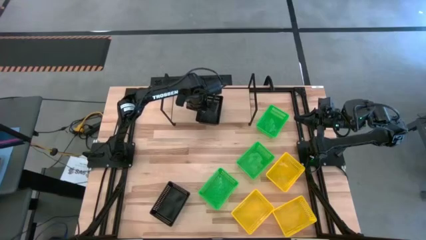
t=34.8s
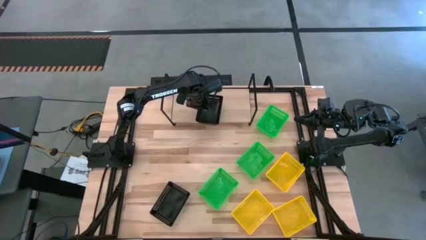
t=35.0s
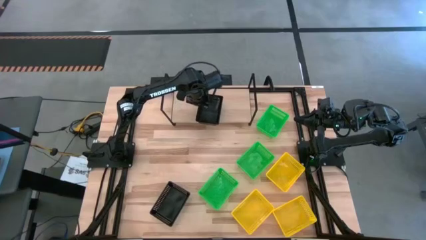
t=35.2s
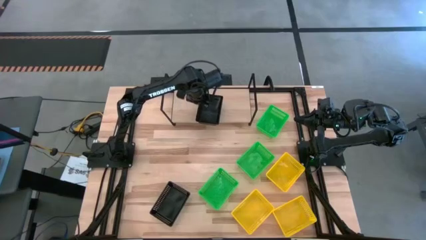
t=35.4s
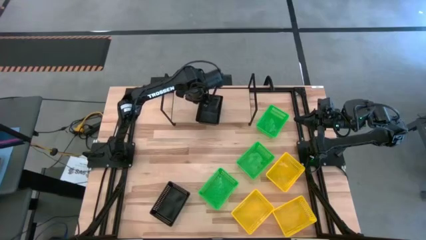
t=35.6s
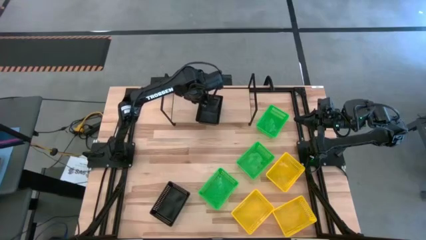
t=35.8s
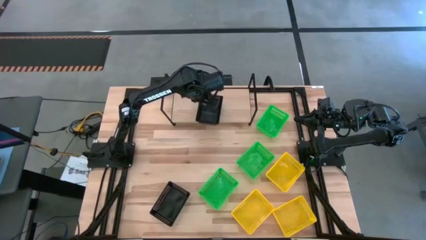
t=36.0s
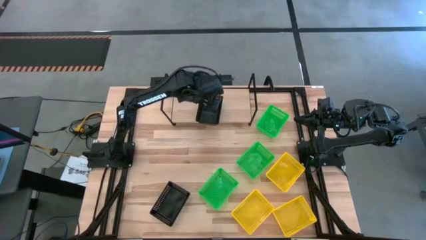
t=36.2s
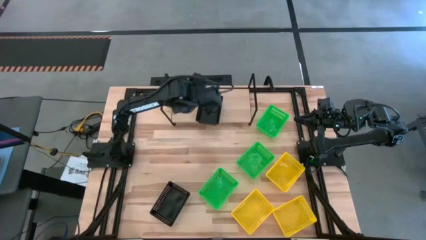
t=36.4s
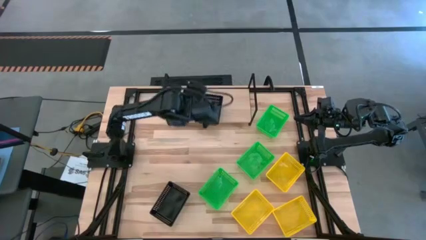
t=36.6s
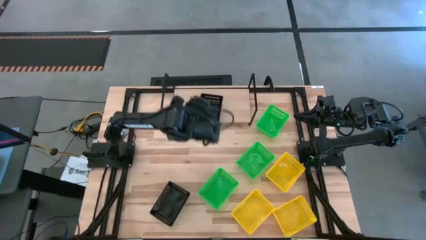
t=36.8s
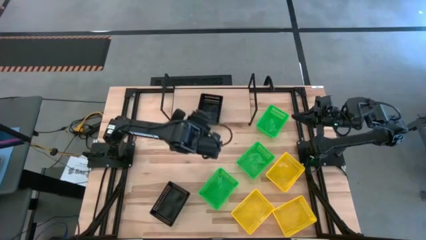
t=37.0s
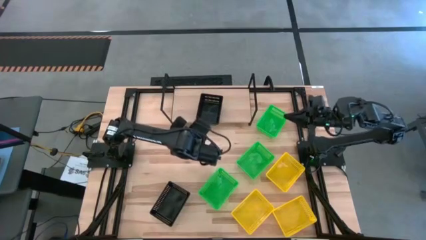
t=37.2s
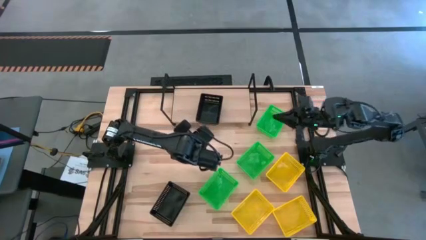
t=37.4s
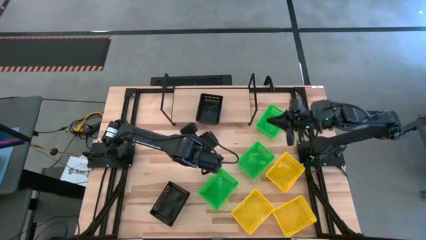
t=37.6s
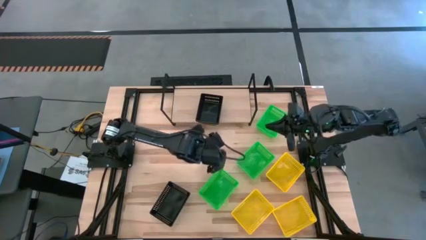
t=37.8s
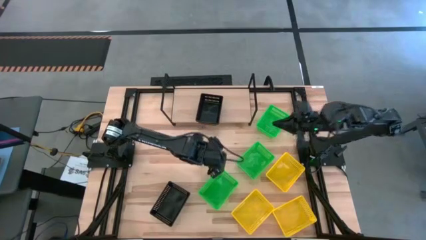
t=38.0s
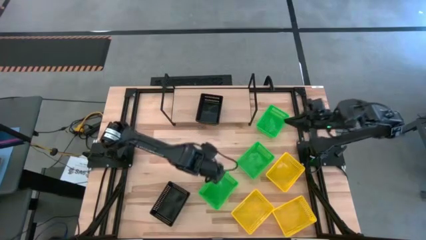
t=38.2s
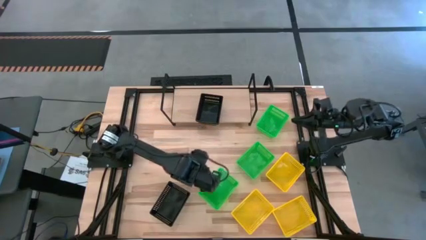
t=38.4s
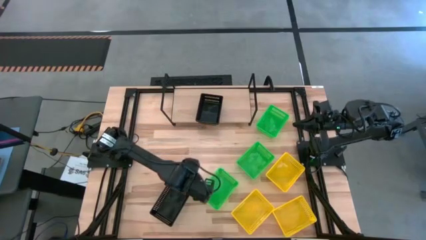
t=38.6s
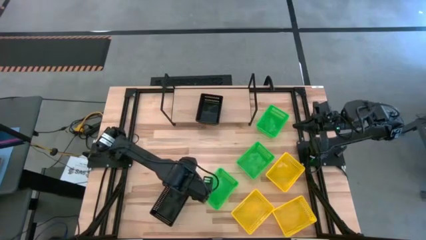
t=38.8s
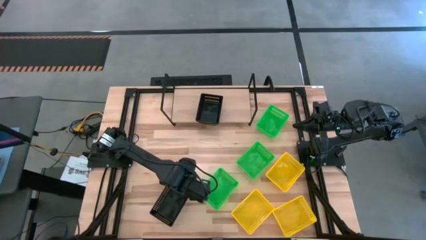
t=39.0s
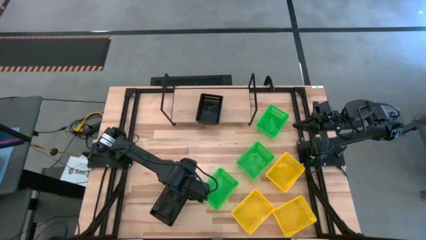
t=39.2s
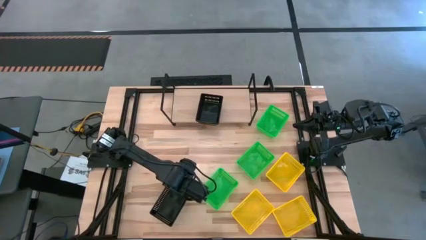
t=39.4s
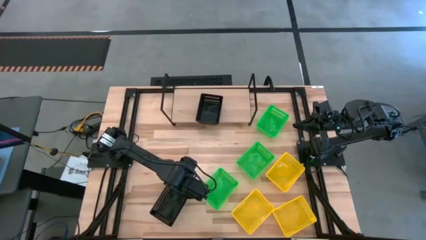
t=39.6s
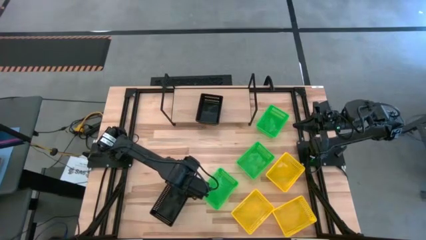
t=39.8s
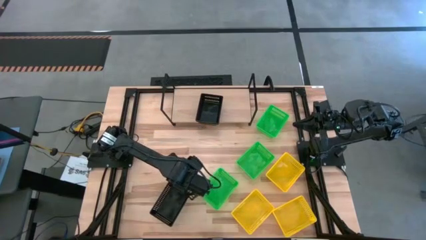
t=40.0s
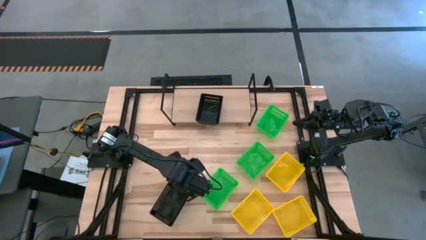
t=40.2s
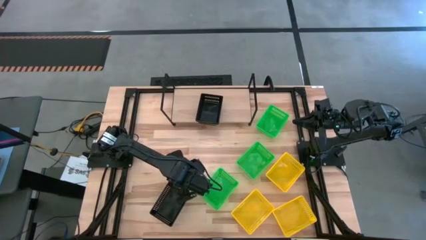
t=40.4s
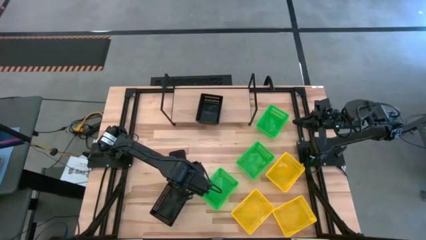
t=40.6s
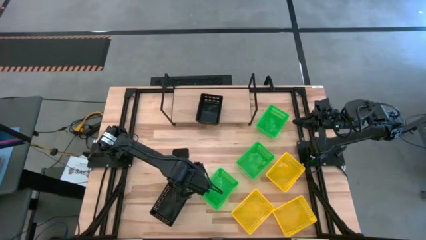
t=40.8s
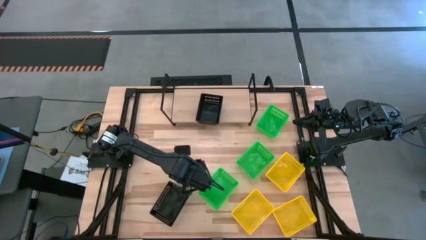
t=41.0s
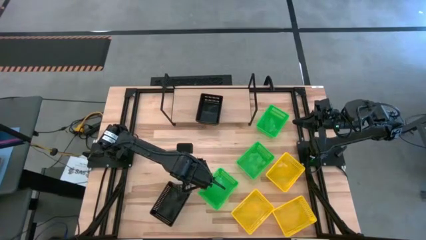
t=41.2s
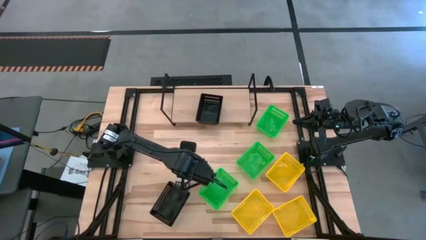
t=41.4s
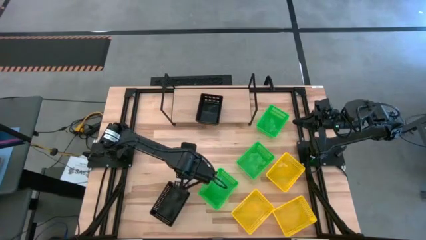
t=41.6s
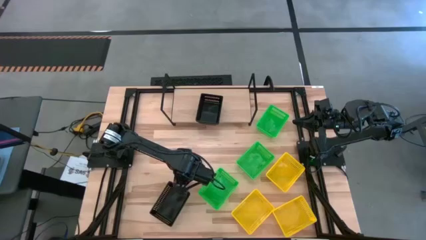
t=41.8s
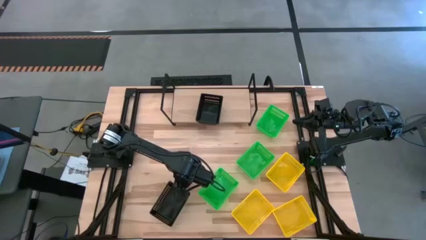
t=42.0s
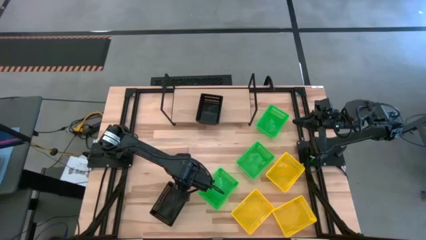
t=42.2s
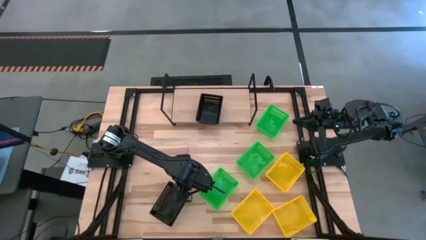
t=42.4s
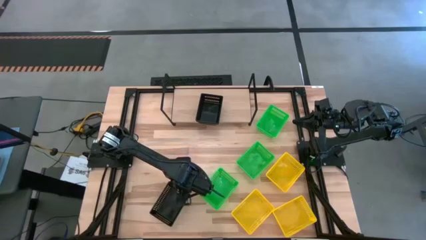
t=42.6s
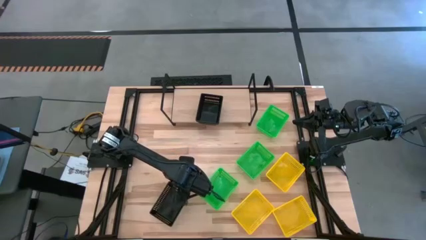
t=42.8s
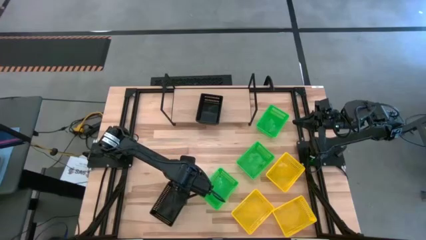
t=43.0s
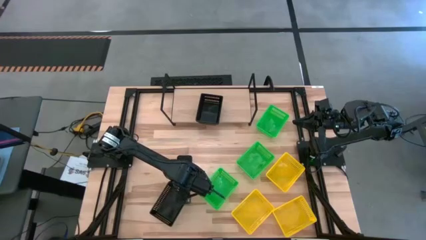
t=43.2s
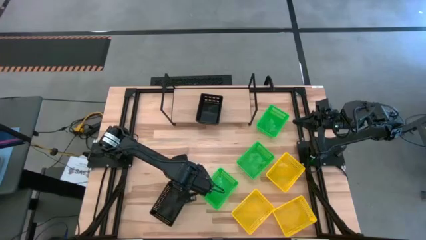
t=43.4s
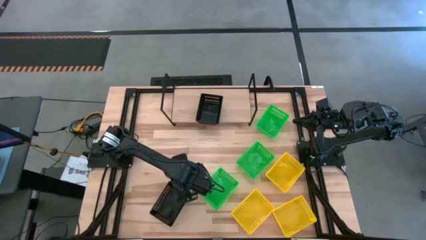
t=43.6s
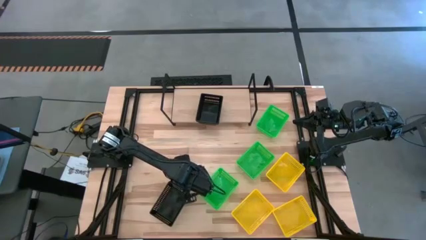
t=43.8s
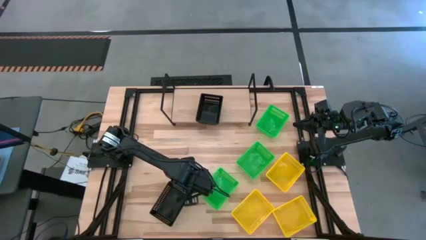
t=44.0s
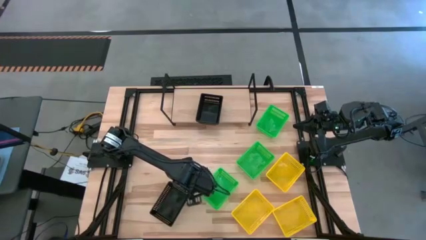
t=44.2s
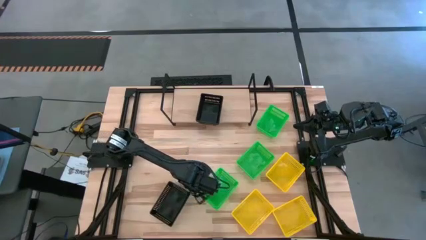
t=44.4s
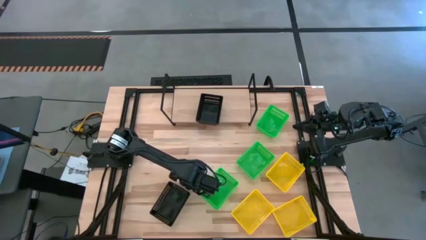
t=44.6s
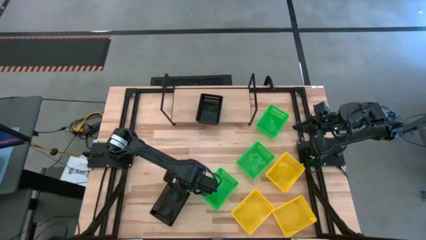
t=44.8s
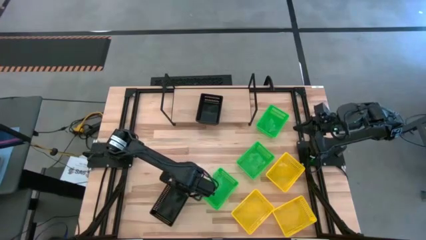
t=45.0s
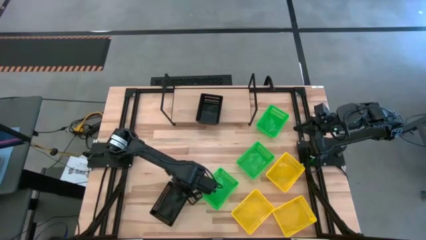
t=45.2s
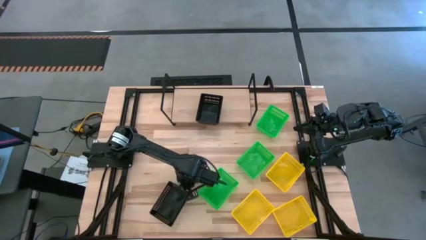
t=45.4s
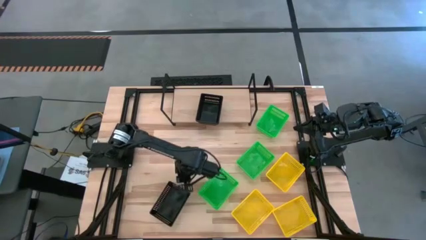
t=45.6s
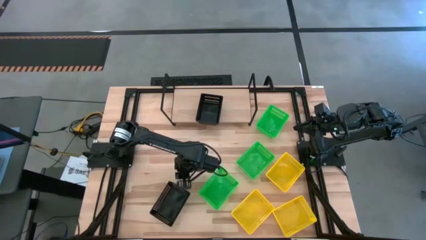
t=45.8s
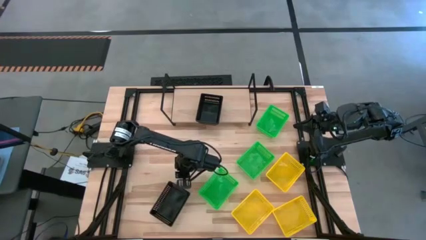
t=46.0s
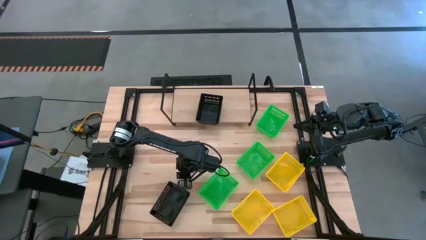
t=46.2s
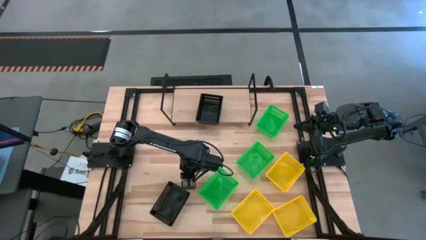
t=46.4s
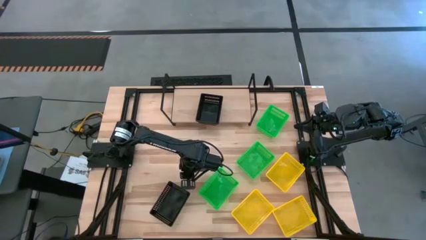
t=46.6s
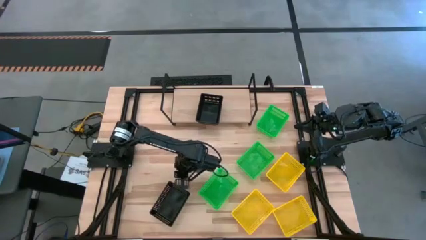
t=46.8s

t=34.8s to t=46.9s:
Task: Stack baskets on shelf by color
Stack the black bin on top of the black bin on the shelf
